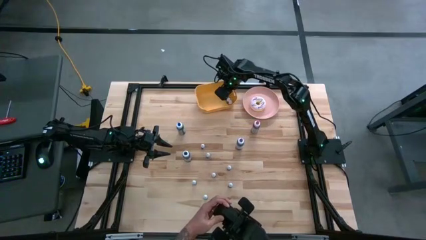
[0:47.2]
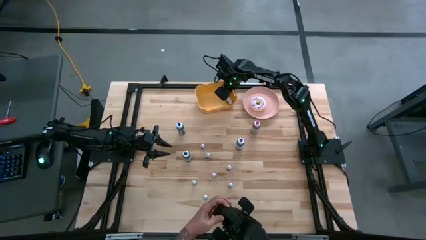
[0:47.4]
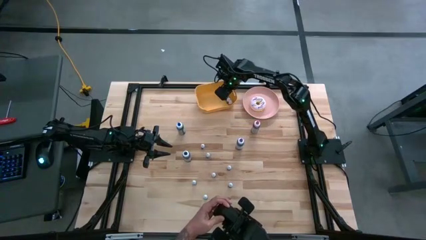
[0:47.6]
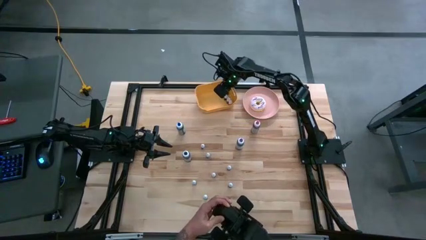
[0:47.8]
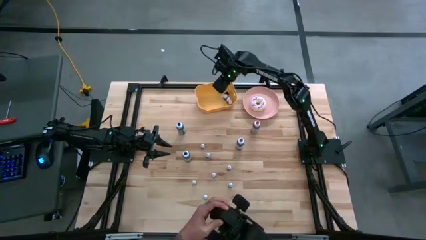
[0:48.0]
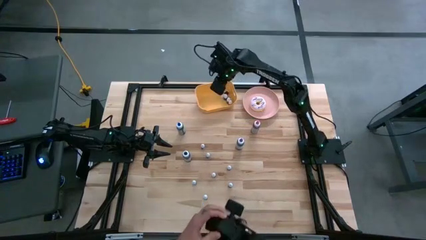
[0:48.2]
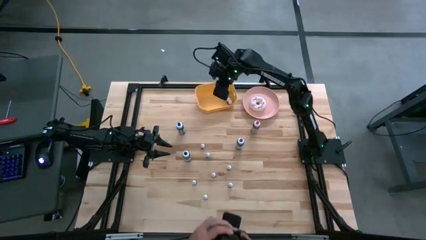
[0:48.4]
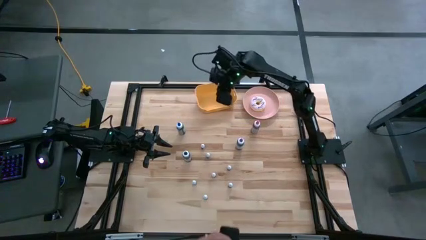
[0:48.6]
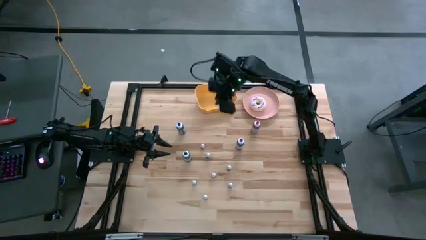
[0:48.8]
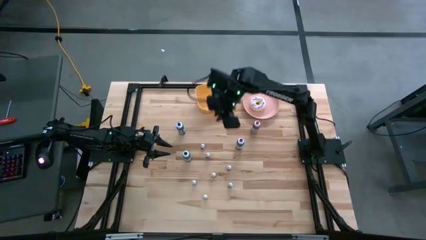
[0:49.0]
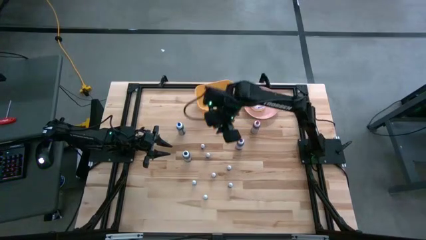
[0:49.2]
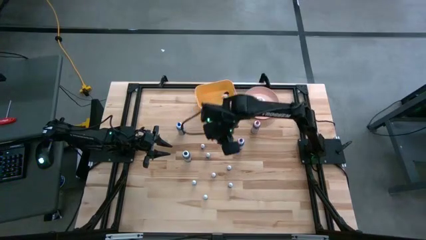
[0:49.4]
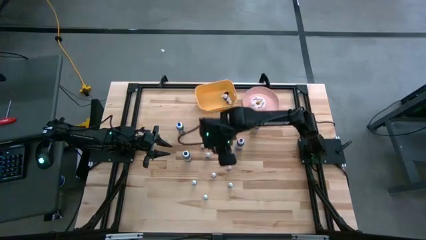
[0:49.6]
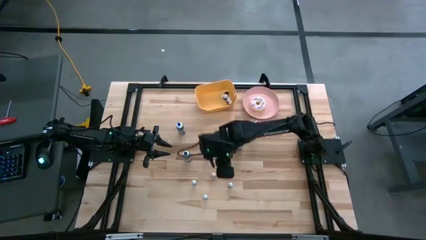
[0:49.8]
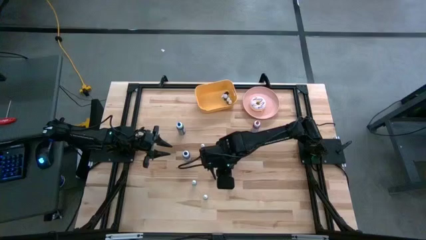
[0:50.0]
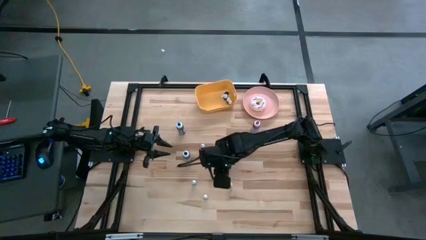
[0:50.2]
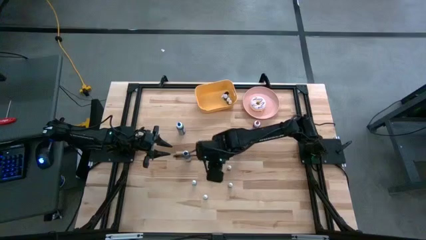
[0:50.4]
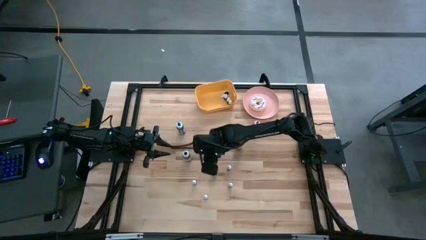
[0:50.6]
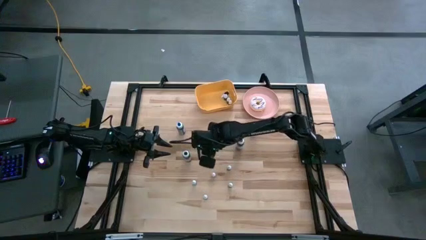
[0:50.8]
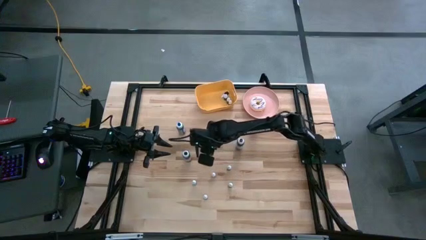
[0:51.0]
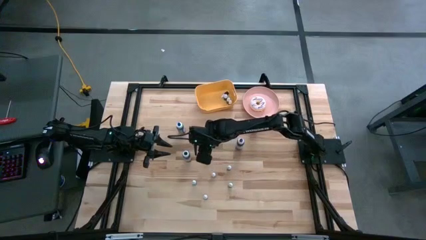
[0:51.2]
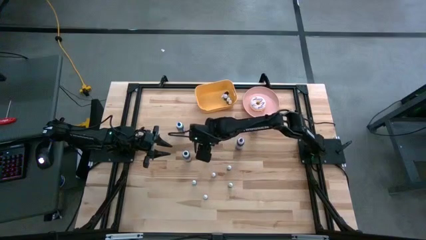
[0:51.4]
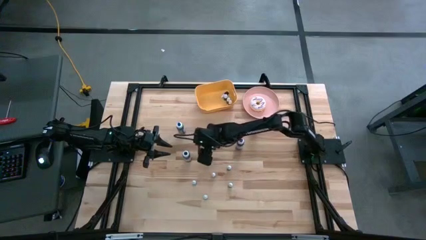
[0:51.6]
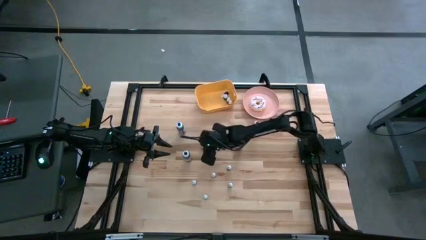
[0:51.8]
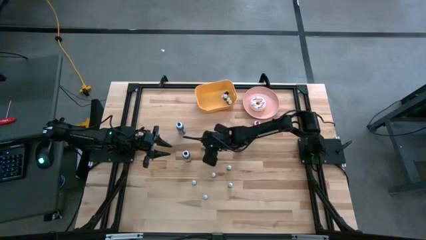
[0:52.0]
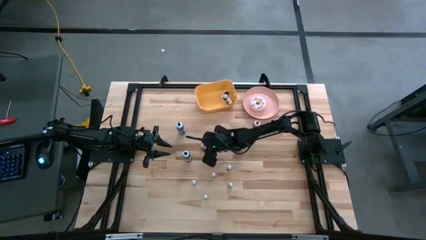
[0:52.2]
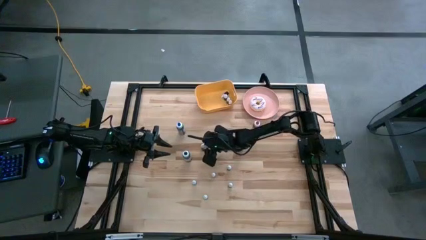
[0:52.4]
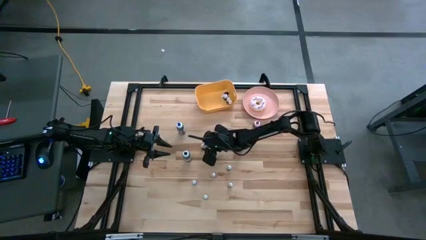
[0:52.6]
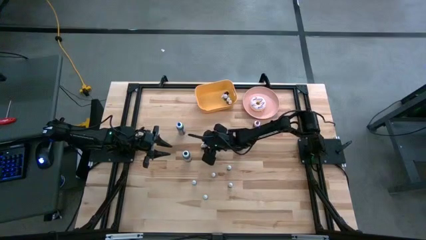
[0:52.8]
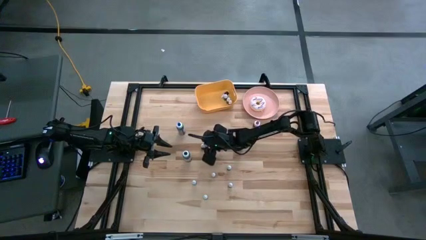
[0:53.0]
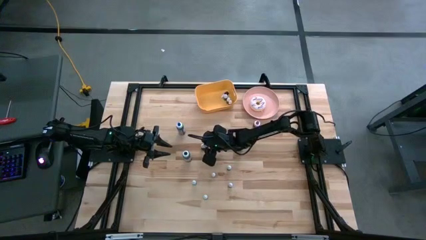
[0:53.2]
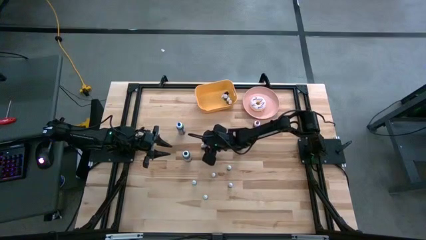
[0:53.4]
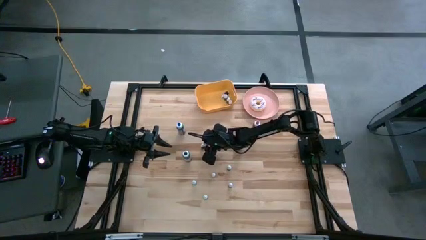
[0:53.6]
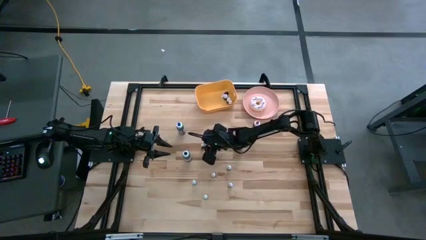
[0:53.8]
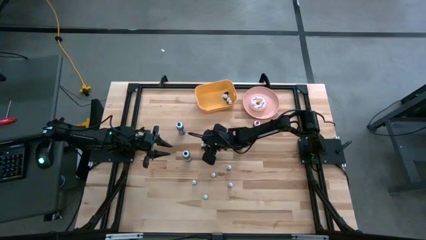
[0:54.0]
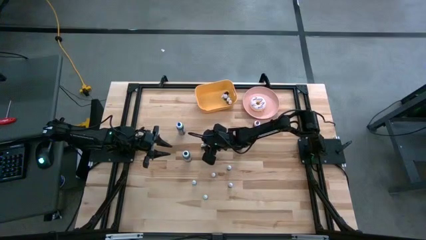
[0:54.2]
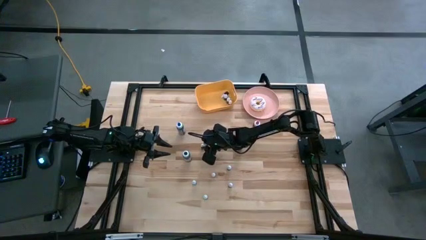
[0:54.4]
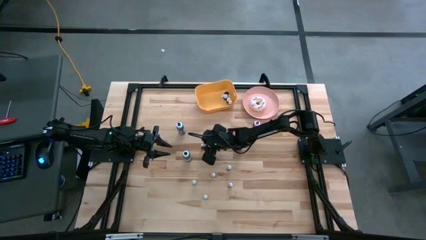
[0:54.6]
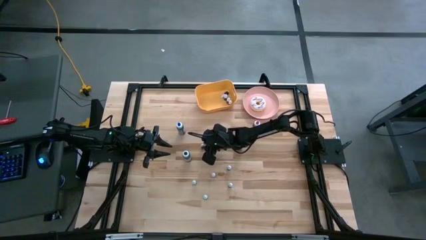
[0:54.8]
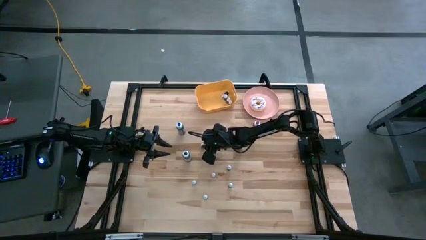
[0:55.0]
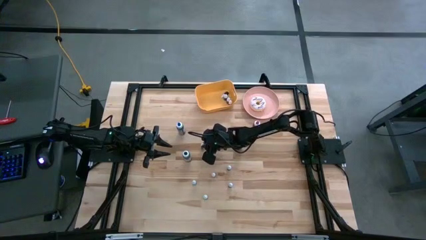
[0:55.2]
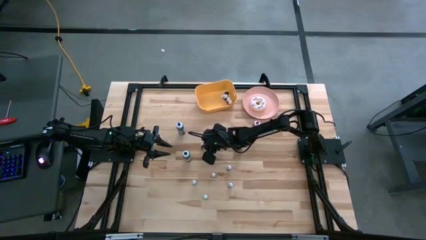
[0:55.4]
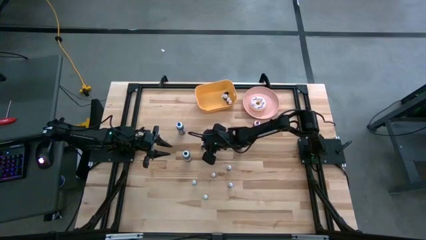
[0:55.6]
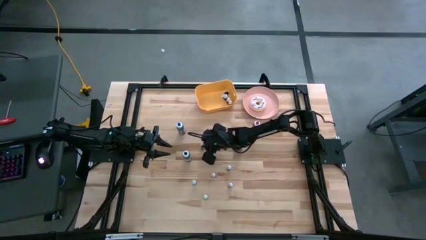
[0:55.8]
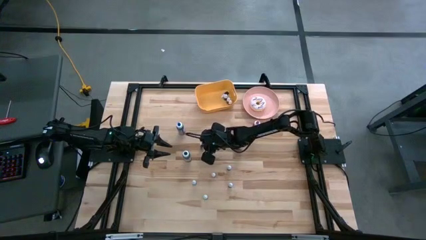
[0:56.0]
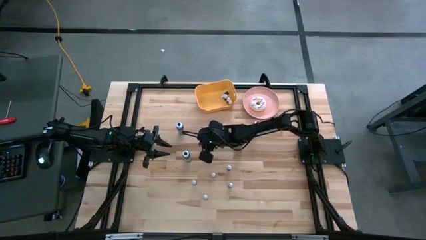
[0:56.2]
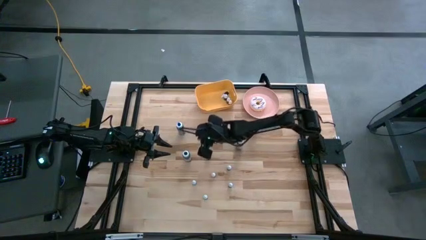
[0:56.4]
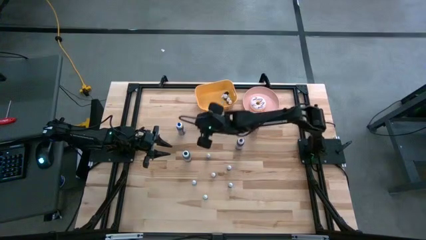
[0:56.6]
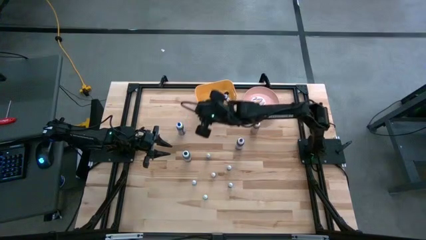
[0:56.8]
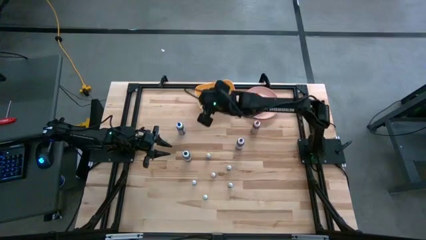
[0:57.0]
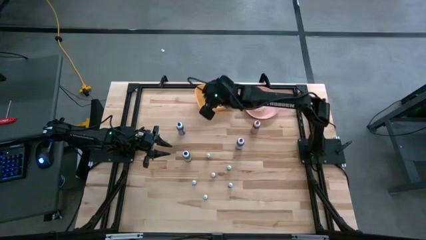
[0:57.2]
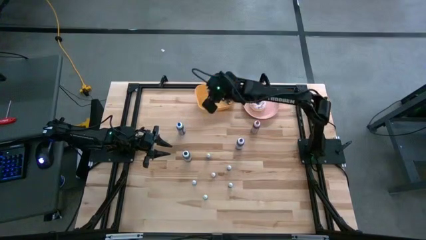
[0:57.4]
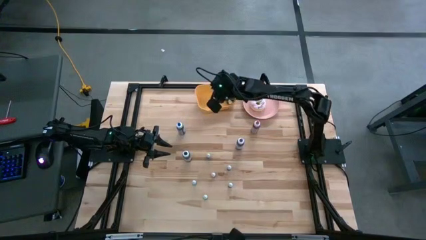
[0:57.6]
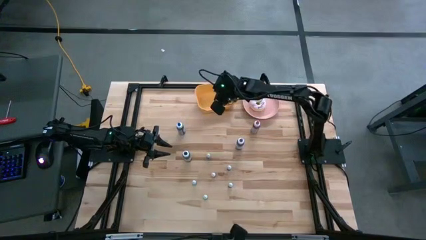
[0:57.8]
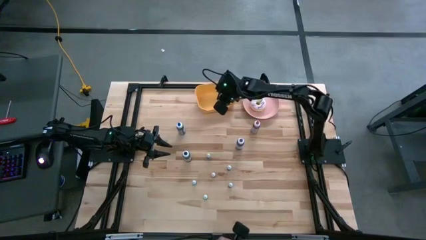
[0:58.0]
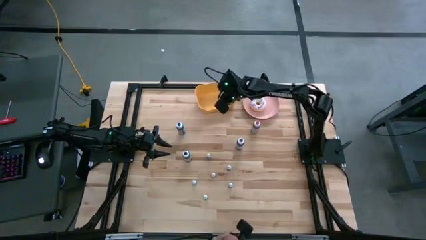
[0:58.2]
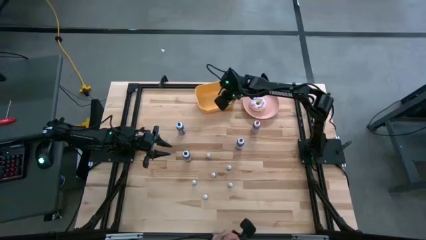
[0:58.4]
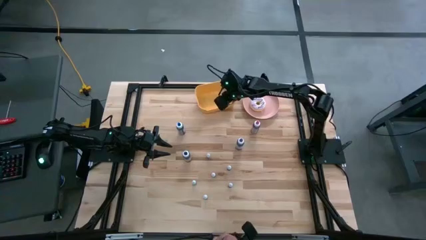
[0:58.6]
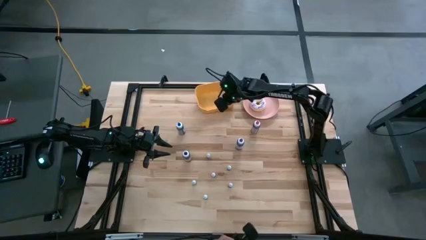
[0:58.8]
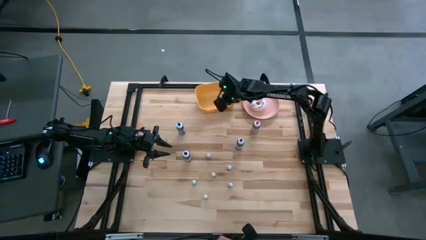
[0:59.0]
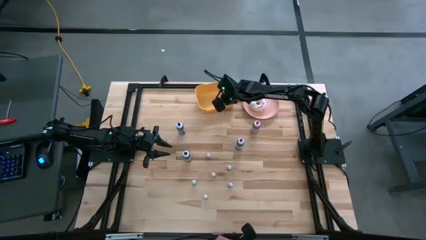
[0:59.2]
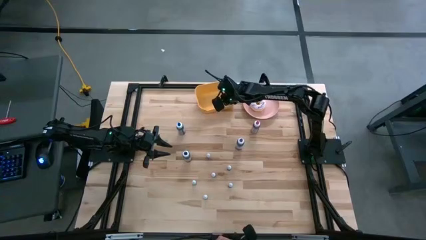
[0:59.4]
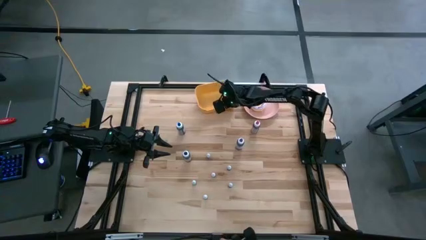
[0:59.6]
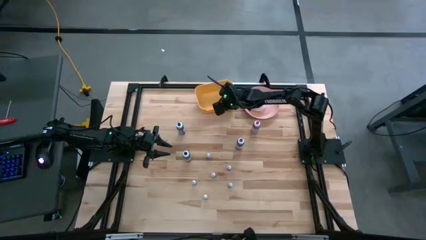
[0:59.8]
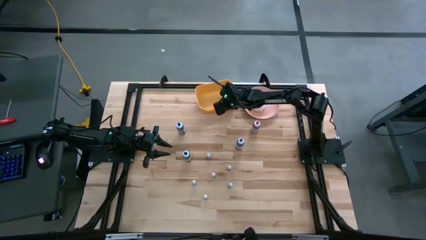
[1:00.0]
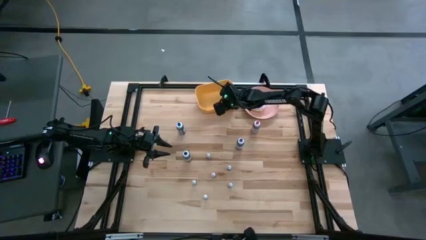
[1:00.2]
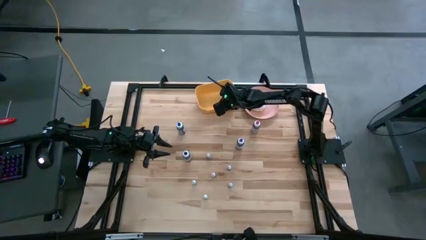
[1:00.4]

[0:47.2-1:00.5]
Task: Pick & Place food coloring
Put the small violet food coloring bottle into the yellow bin

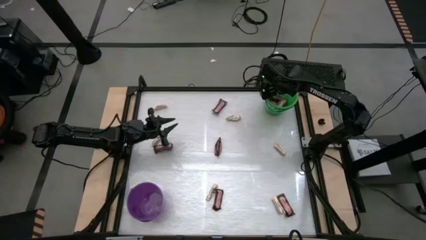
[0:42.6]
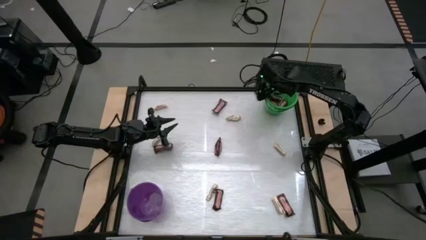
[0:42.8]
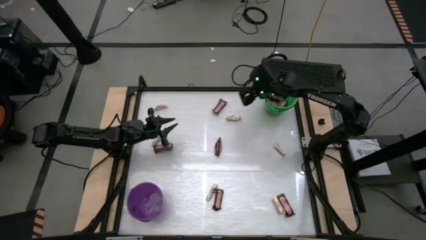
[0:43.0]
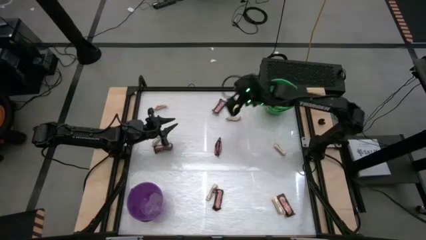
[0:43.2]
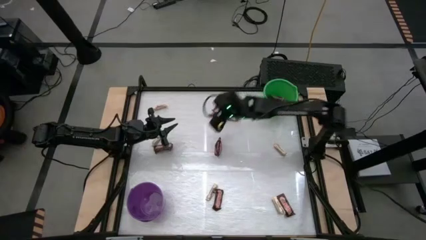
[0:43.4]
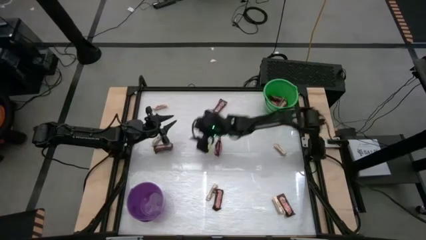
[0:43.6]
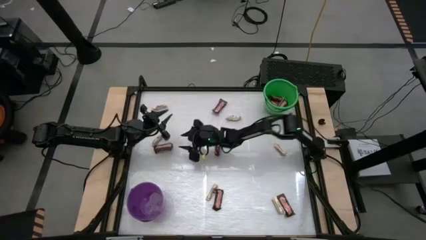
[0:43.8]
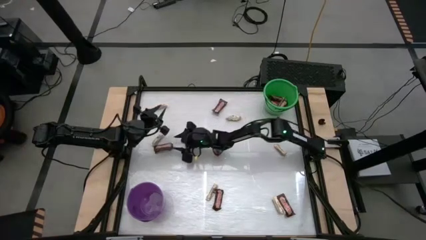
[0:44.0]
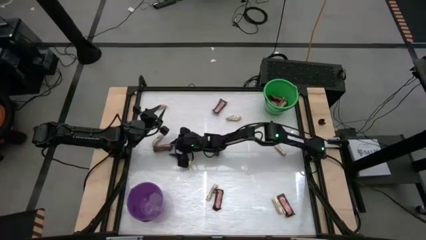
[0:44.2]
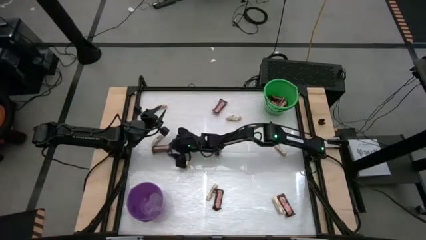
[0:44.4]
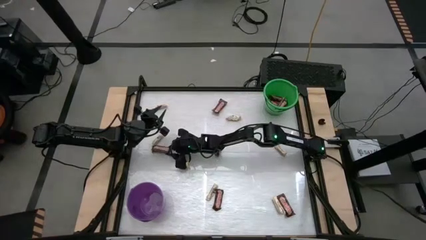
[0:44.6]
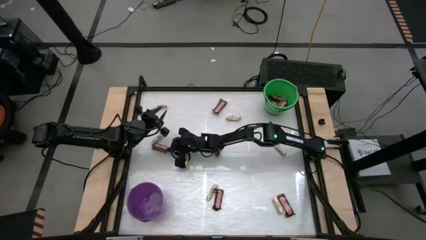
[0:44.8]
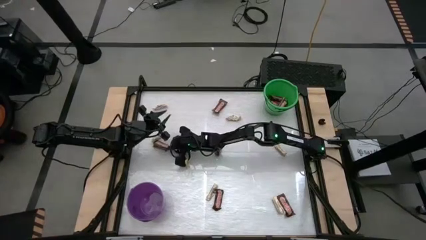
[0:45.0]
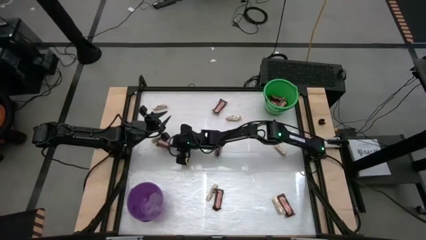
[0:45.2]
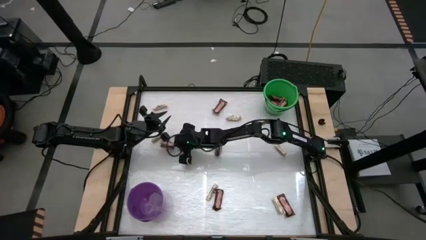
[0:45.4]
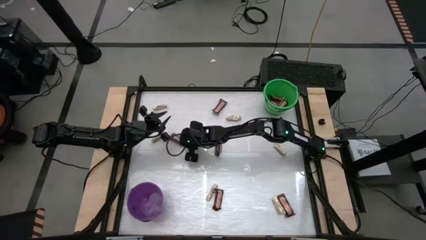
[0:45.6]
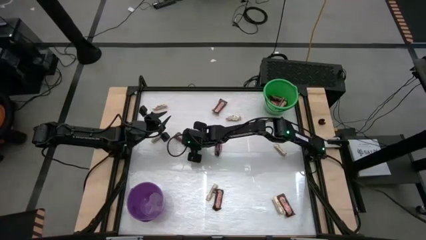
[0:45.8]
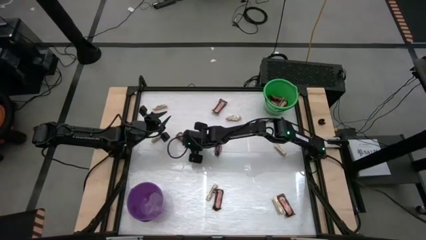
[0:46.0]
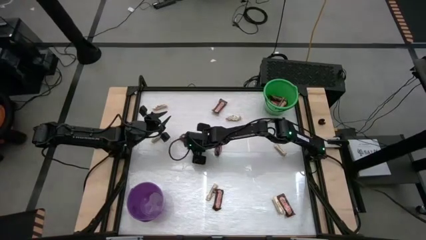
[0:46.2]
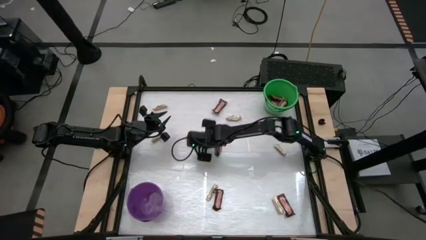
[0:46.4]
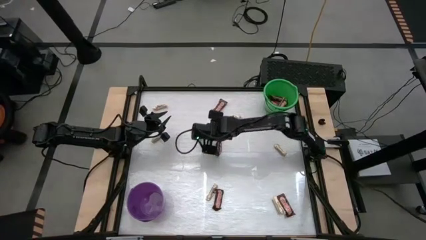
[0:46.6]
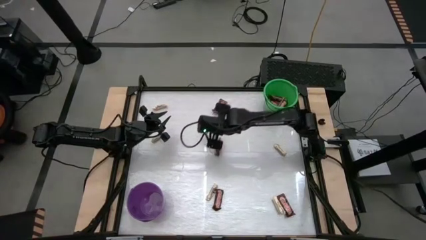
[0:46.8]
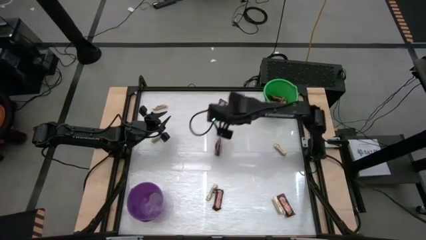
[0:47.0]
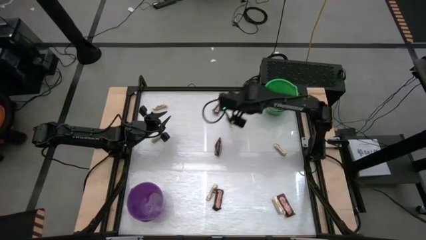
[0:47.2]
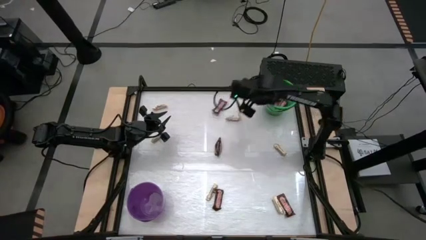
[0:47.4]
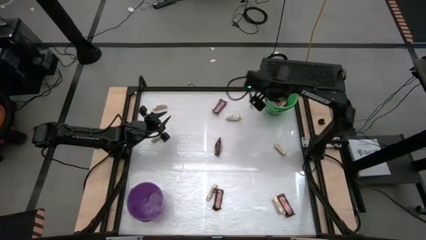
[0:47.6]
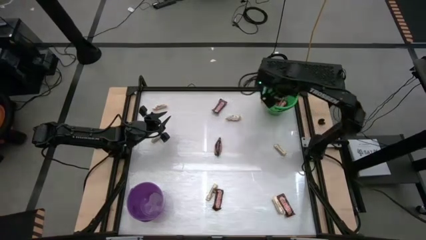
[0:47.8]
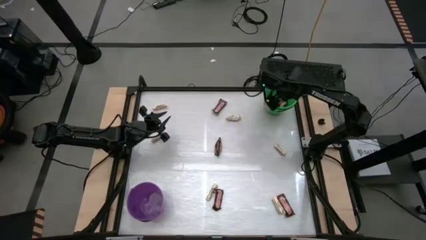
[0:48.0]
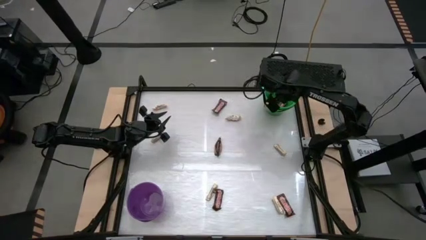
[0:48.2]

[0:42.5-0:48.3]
Task: Sort candy by brand, put in halloween buckets
Put the brown candy bar into the green bucket
